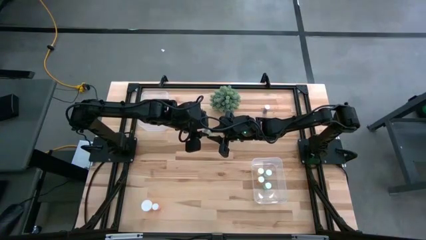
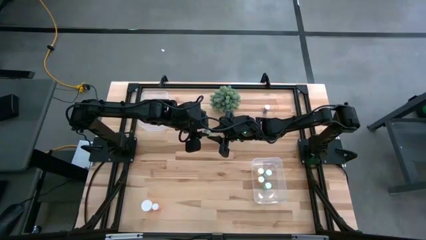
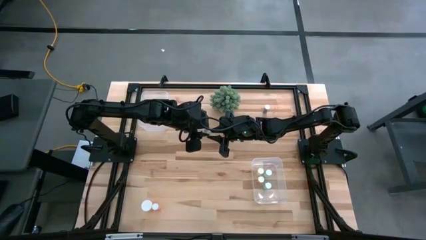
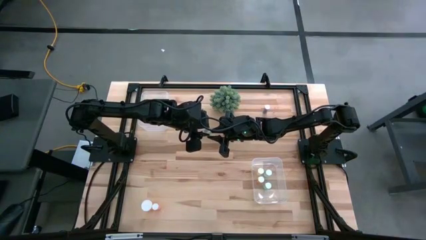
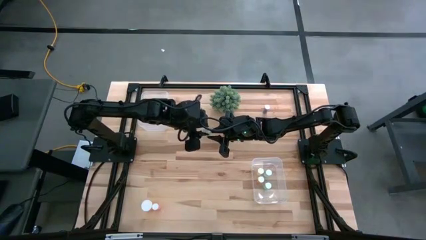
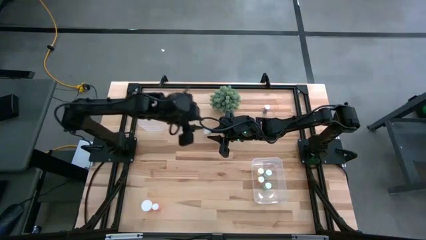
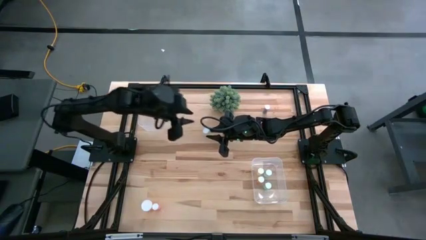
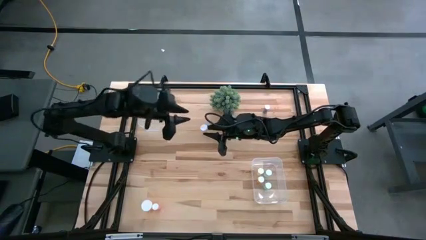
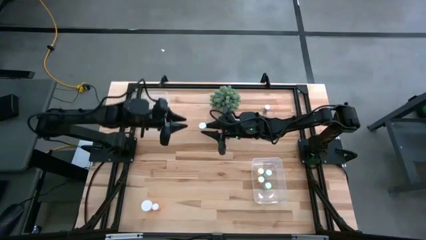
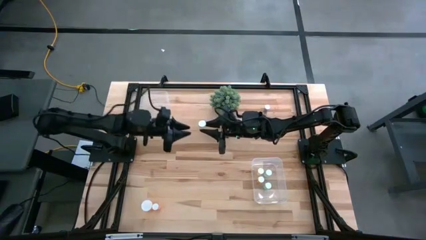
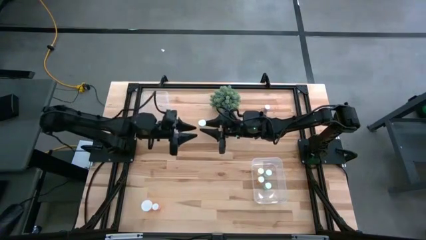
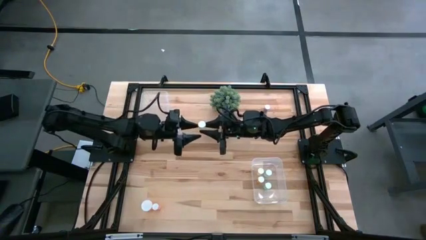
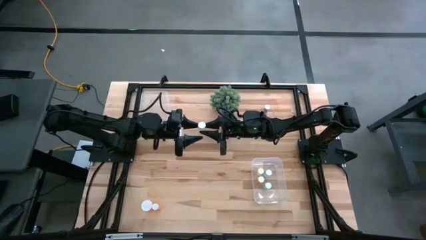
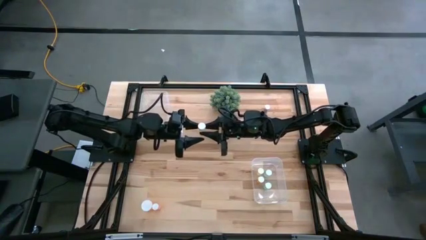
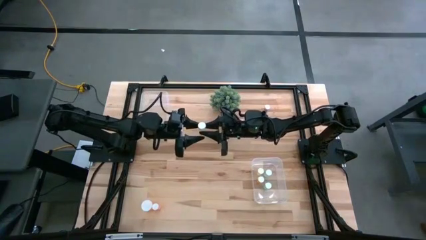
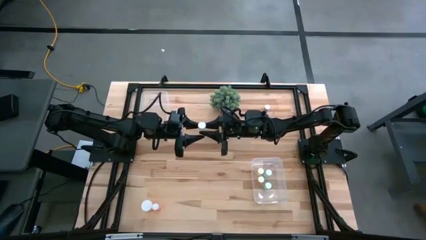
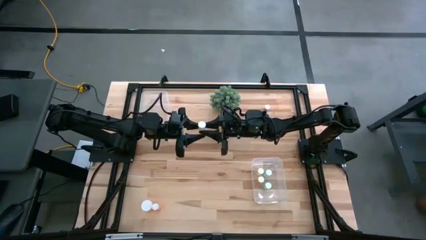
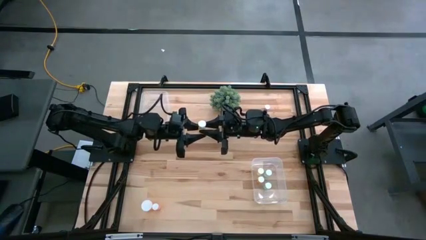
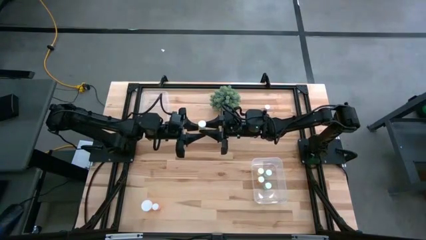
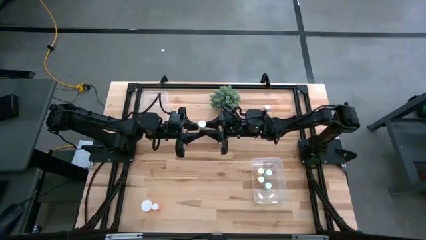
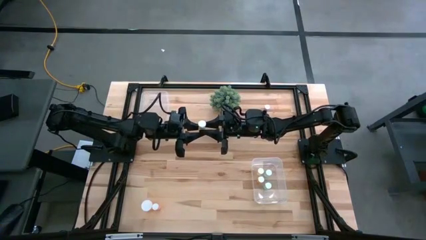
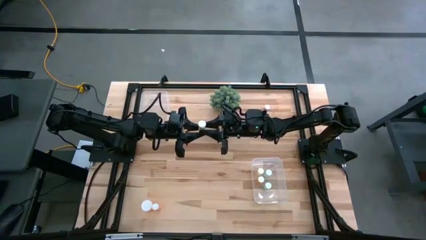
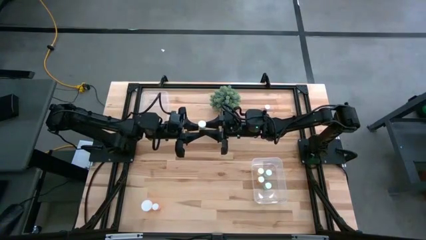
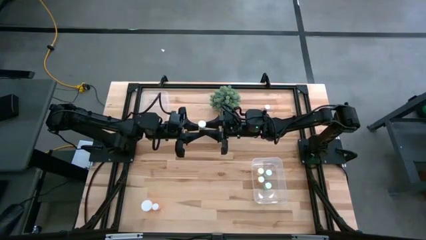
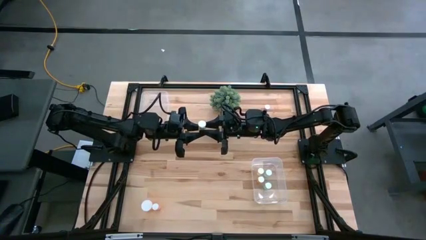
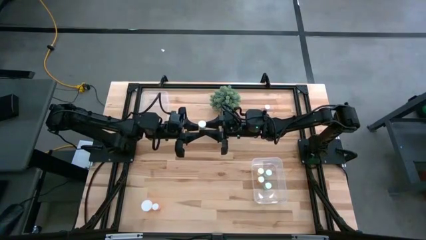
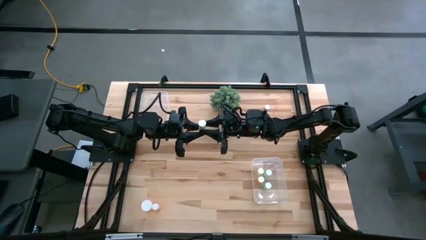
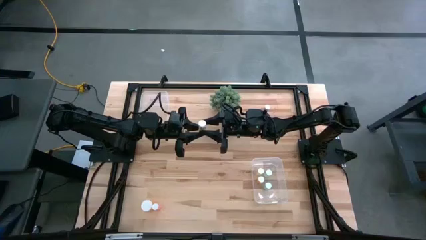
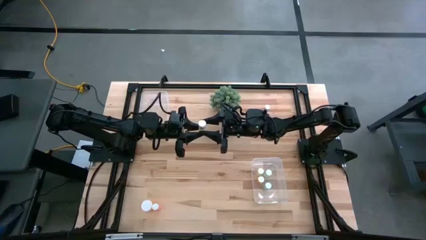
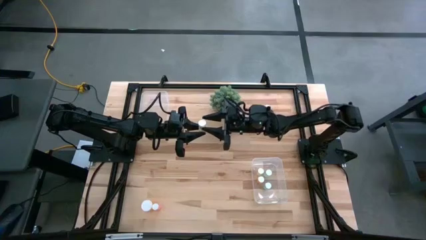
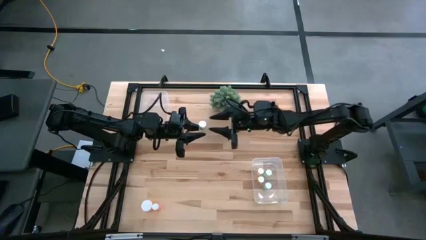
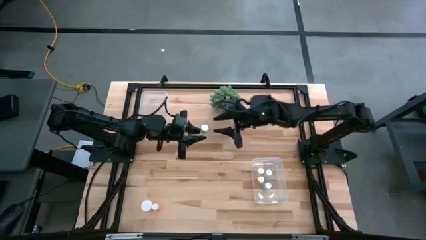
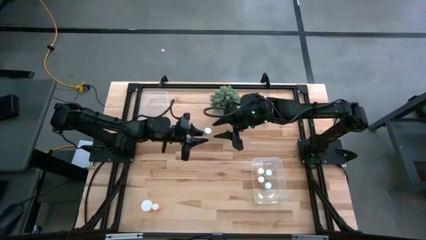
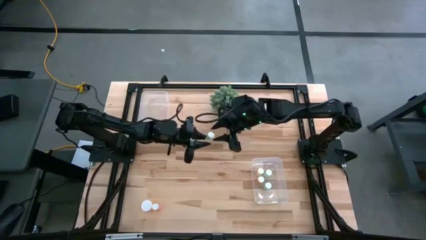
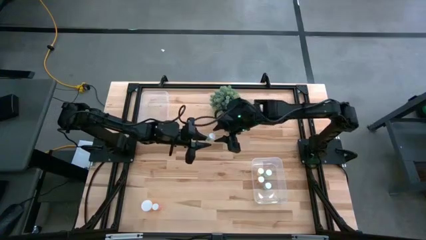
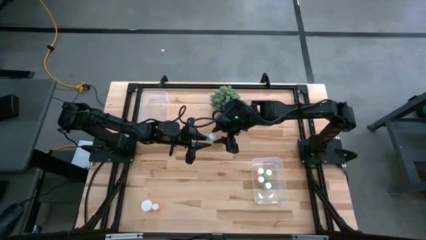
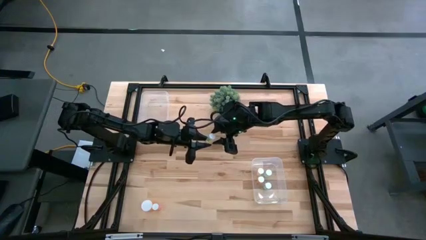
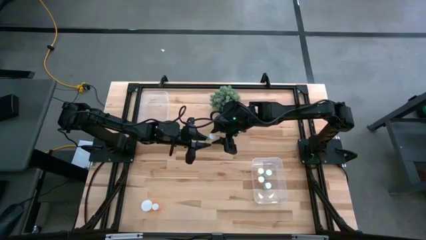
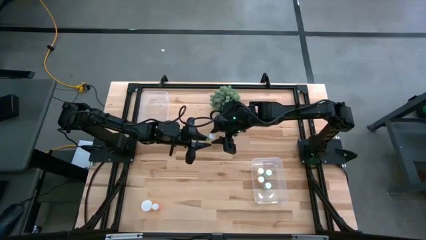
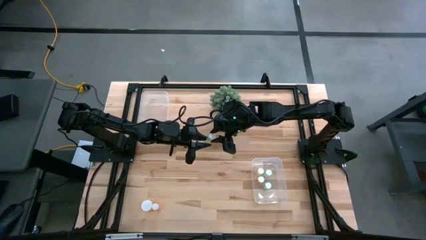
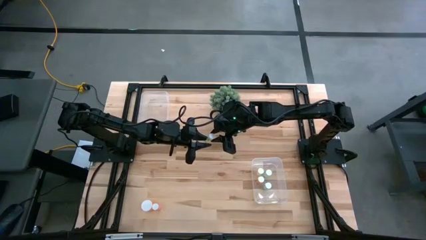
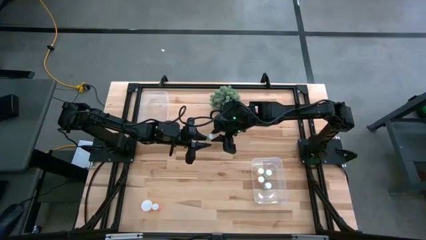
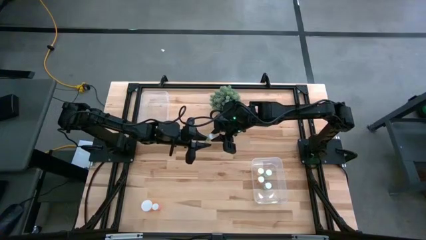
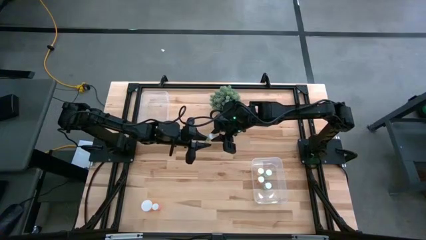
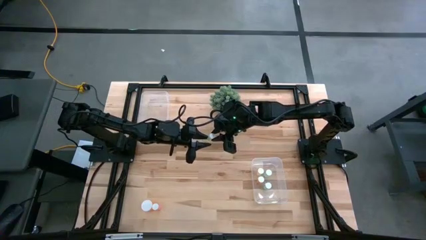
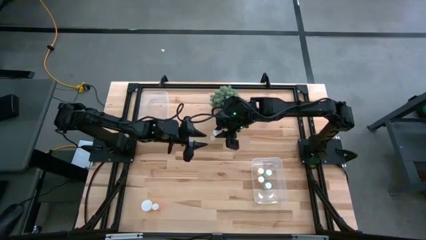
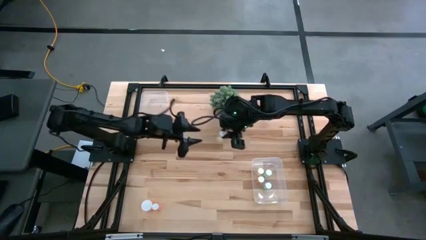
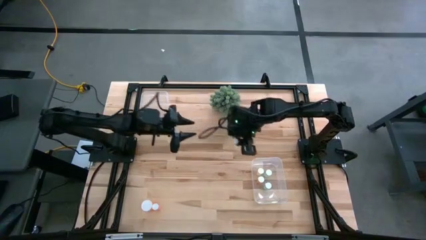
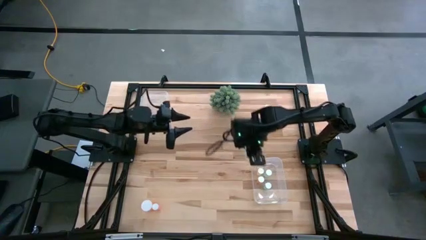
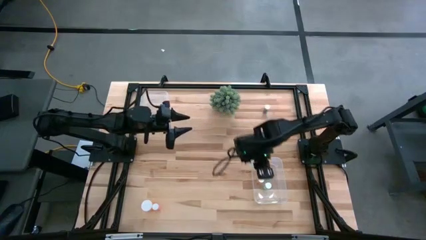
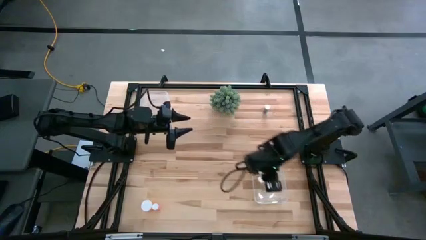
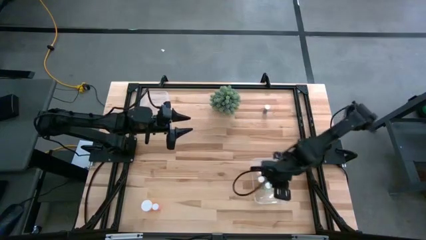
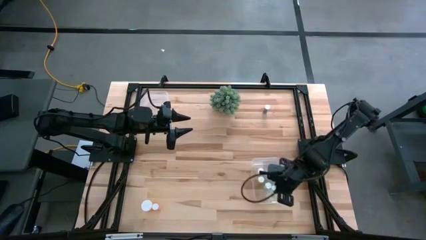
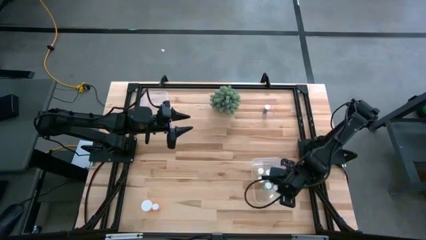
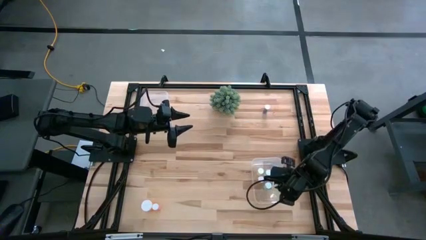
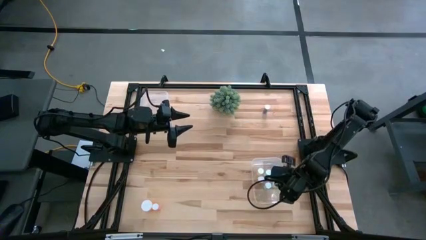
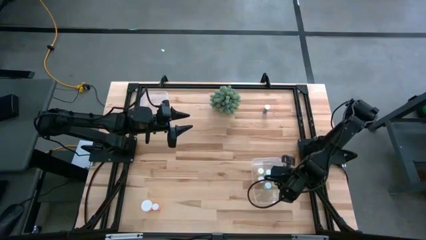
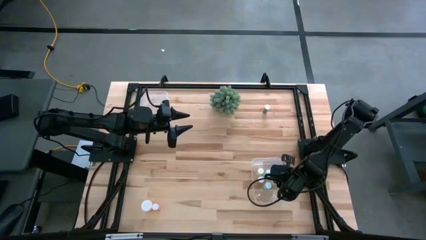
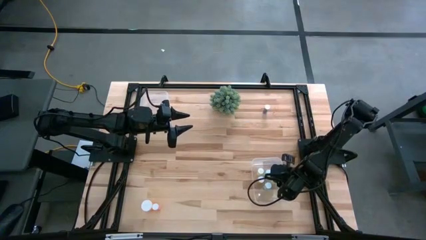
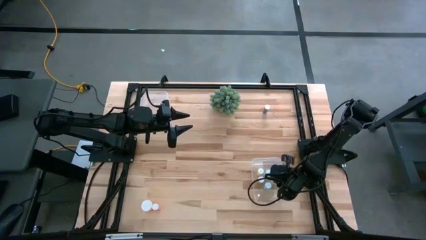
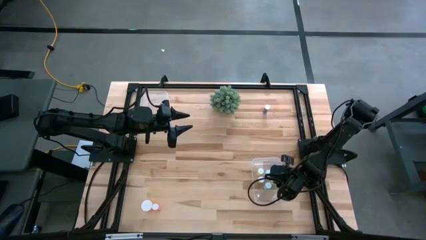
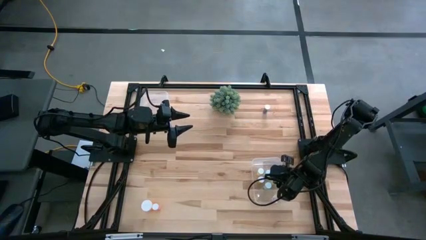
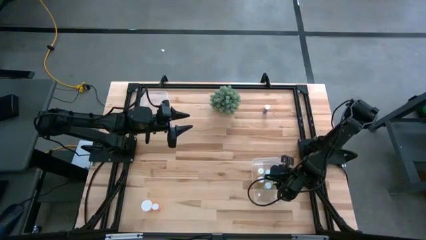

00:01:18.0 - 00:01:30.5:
Task: Pick and place medicine bottles into bin by pill shape (circle, oval)
Put the yellow tablet bottle into the right transparent bin

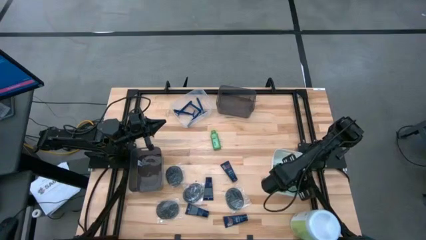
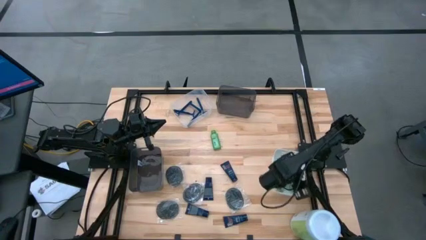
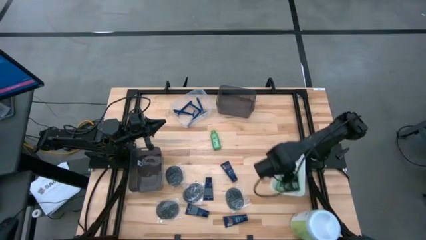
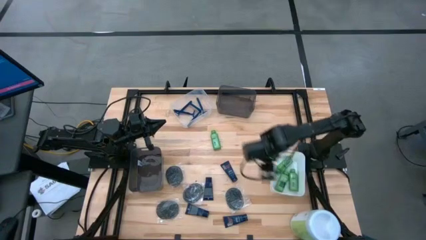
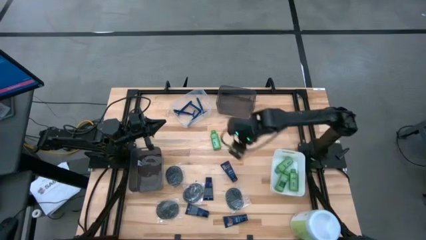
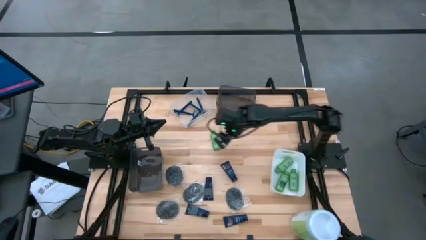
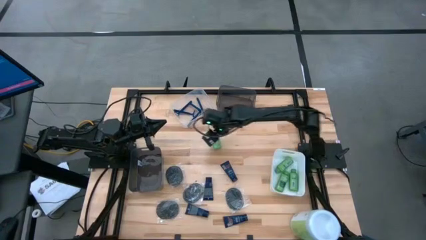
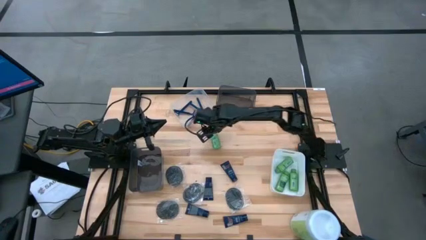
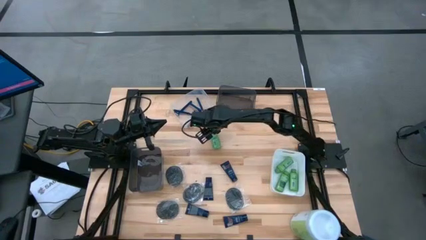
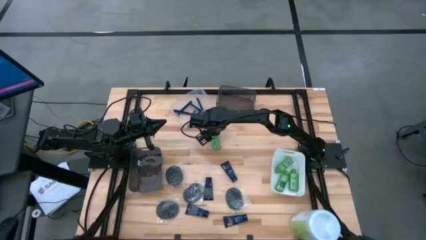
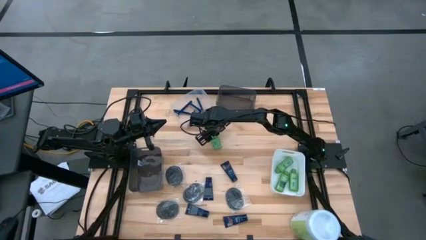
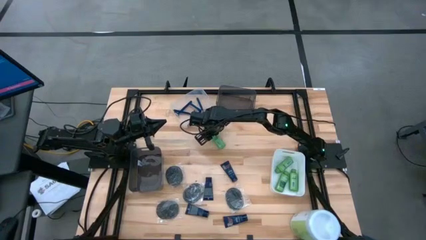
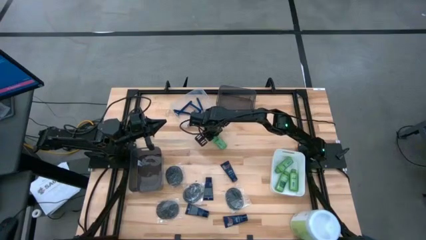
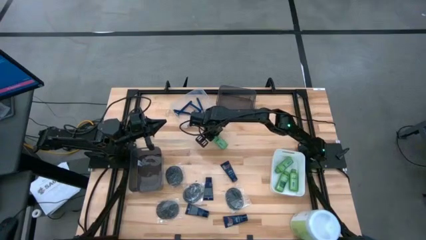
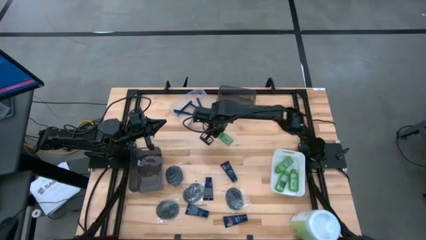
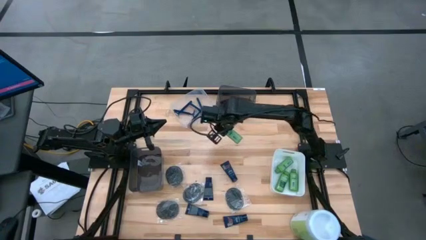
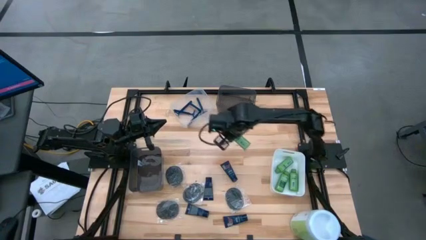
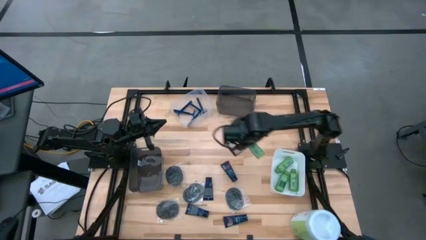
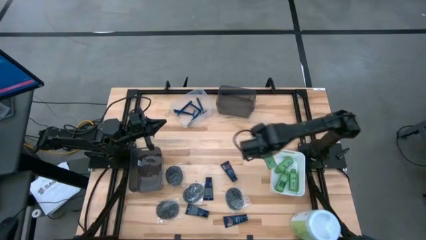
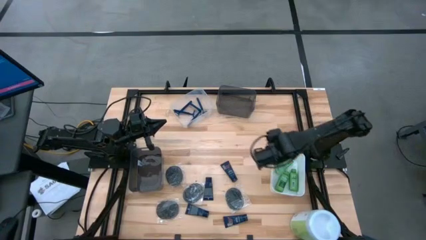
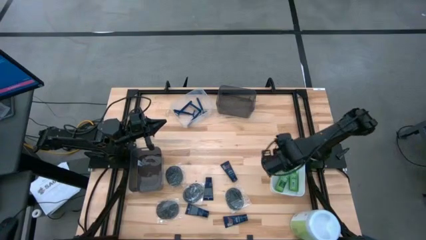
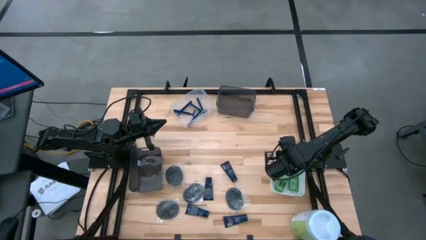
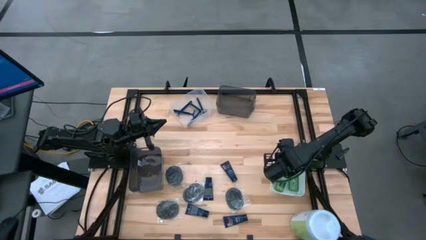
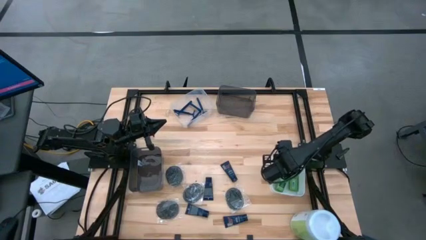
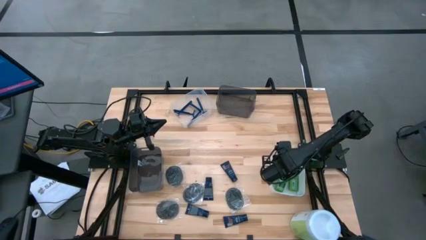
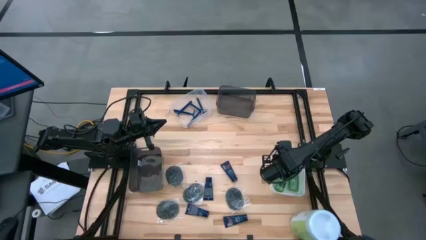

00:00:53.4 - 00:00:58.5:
Task: Pick & Place Travel size toiletries
Put the green shampoo into the white bin
